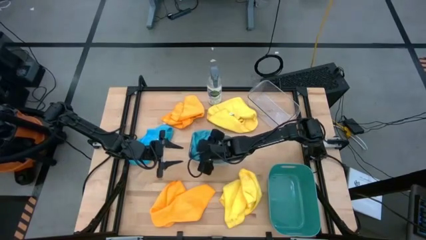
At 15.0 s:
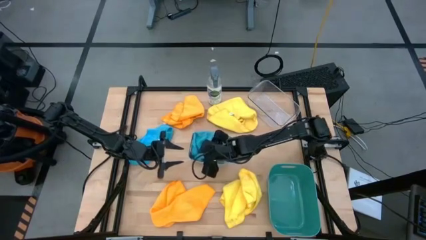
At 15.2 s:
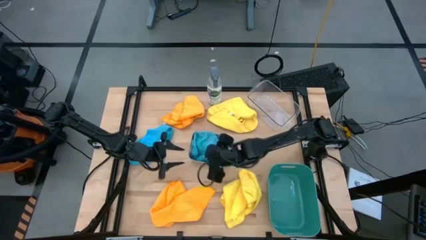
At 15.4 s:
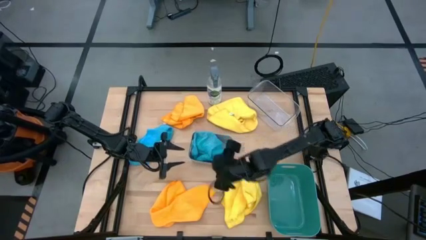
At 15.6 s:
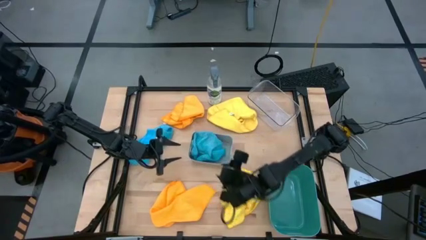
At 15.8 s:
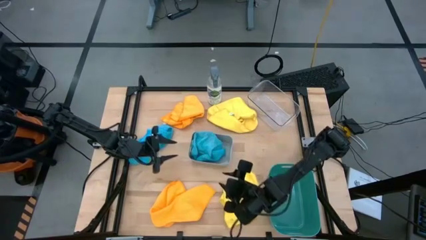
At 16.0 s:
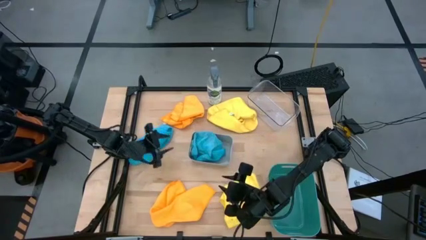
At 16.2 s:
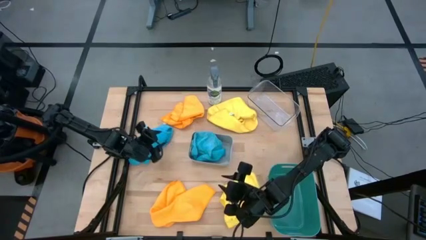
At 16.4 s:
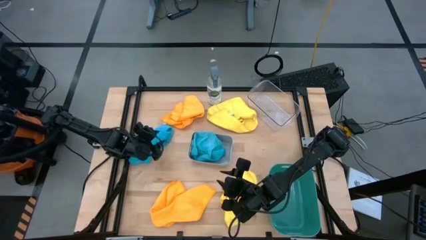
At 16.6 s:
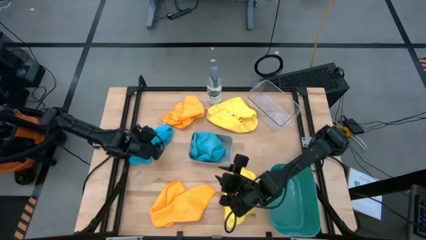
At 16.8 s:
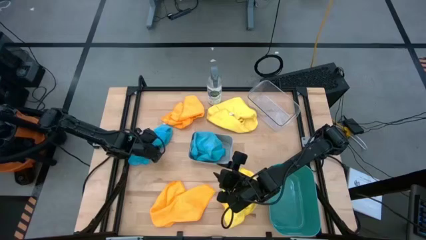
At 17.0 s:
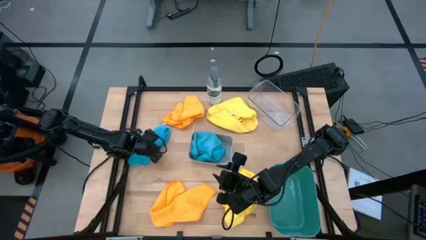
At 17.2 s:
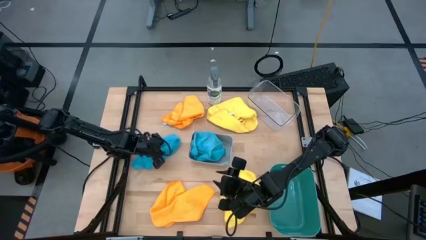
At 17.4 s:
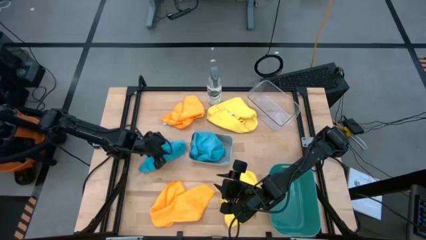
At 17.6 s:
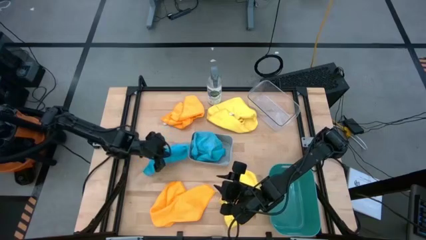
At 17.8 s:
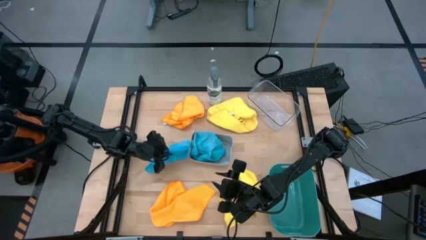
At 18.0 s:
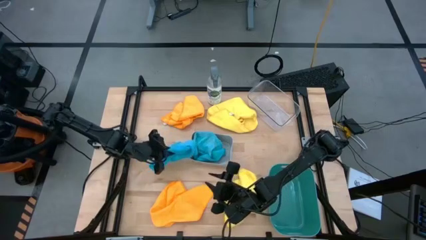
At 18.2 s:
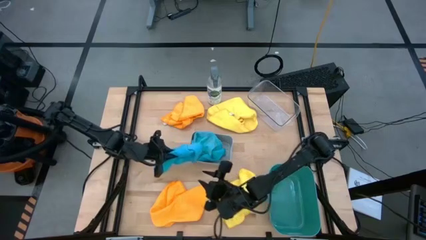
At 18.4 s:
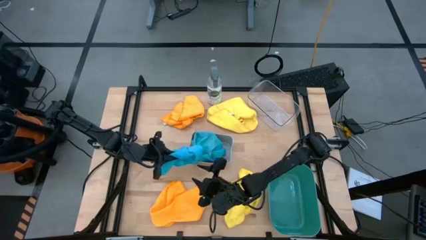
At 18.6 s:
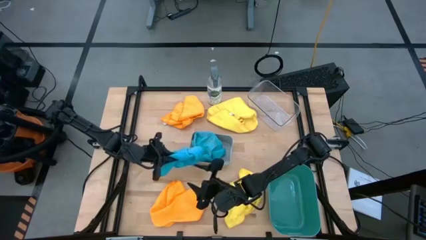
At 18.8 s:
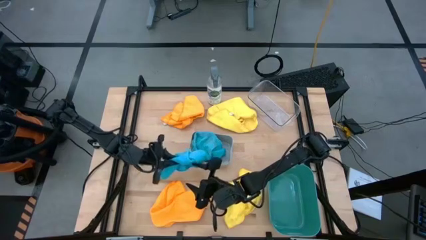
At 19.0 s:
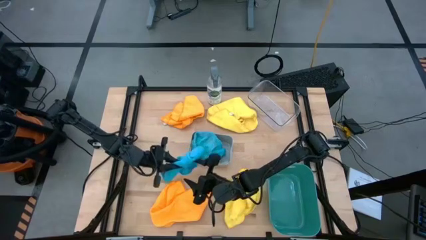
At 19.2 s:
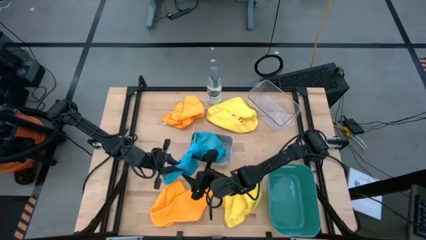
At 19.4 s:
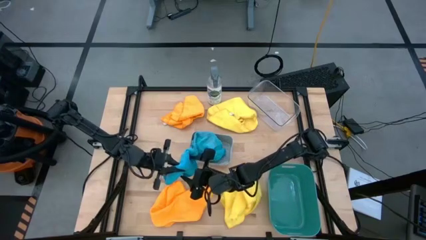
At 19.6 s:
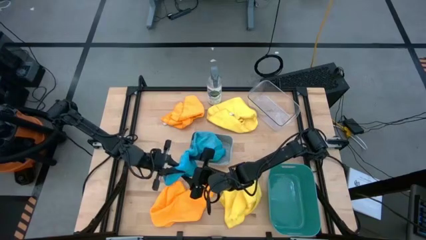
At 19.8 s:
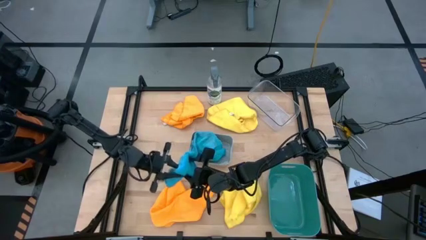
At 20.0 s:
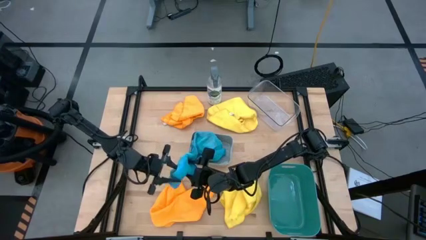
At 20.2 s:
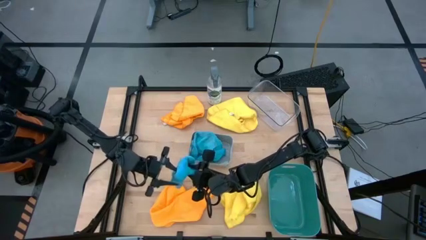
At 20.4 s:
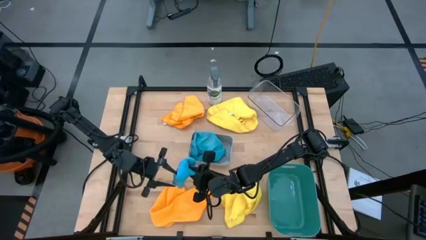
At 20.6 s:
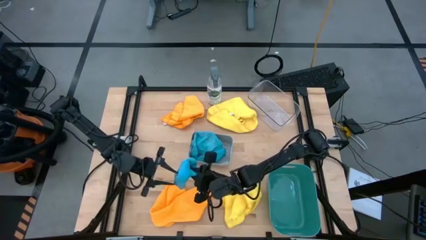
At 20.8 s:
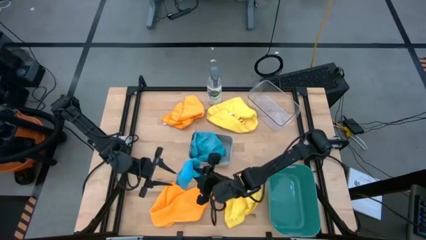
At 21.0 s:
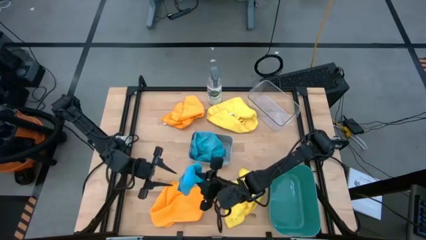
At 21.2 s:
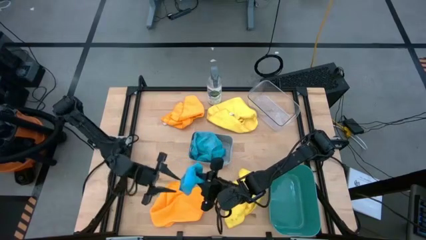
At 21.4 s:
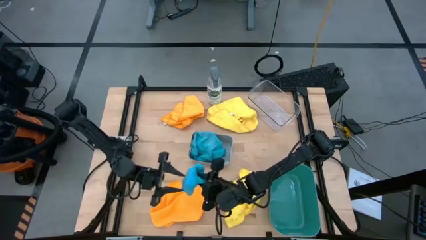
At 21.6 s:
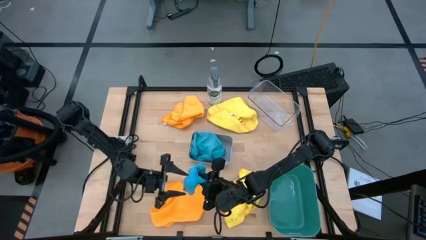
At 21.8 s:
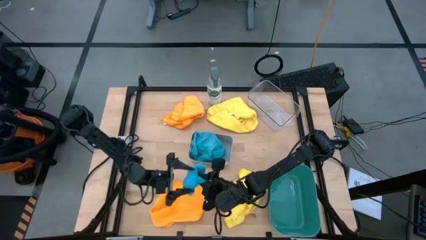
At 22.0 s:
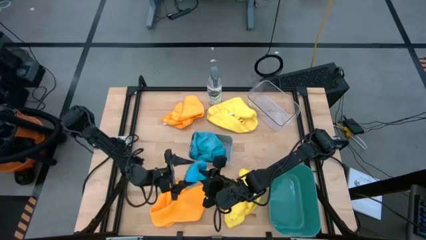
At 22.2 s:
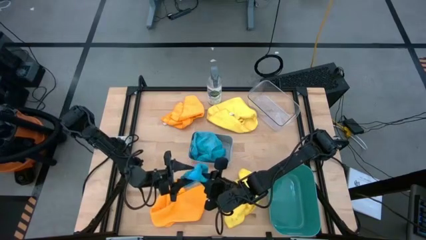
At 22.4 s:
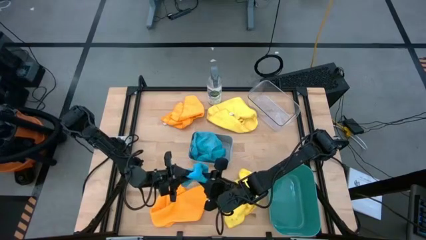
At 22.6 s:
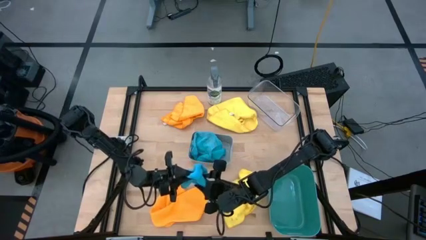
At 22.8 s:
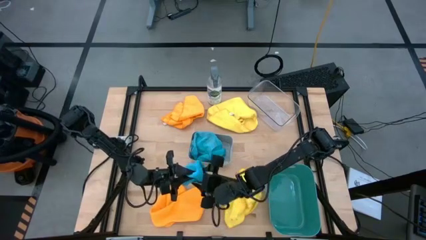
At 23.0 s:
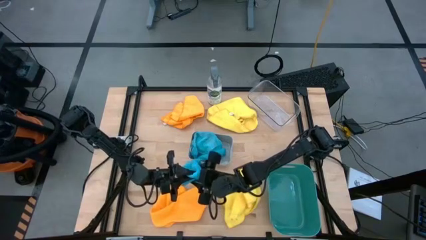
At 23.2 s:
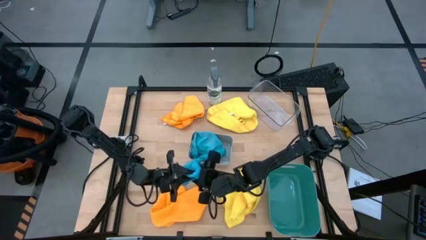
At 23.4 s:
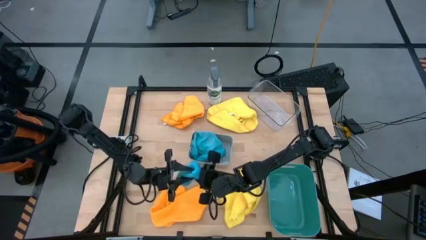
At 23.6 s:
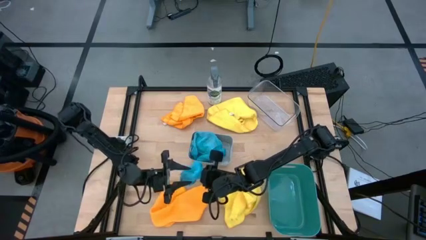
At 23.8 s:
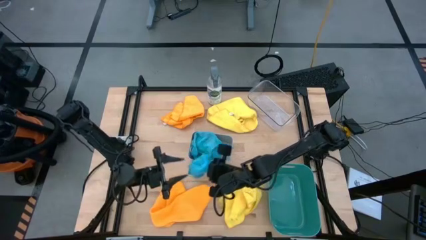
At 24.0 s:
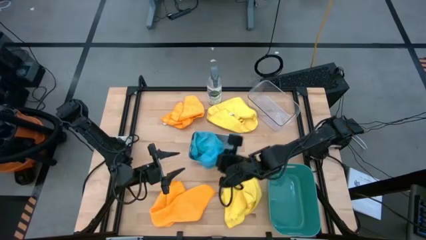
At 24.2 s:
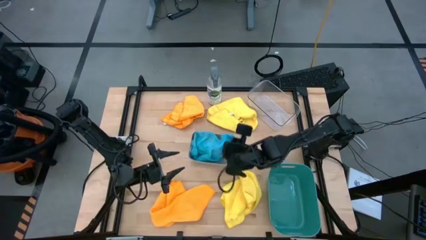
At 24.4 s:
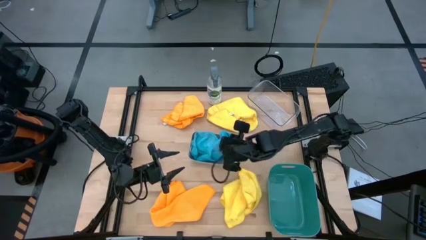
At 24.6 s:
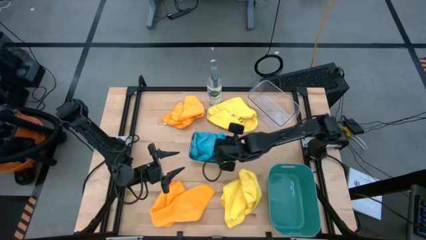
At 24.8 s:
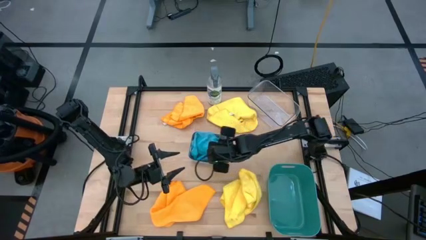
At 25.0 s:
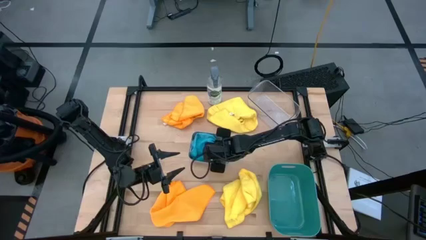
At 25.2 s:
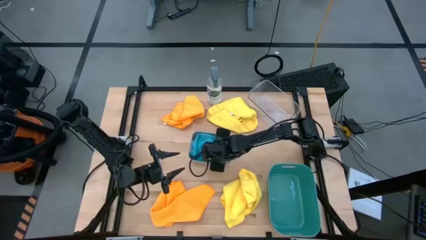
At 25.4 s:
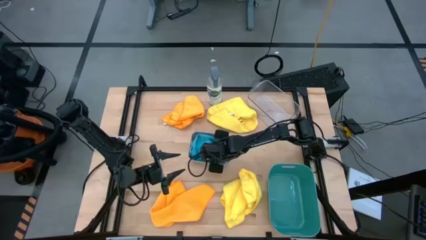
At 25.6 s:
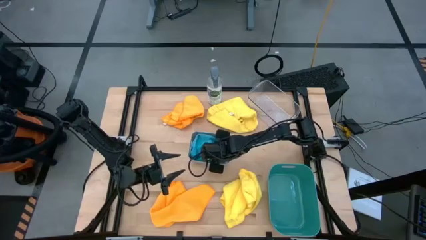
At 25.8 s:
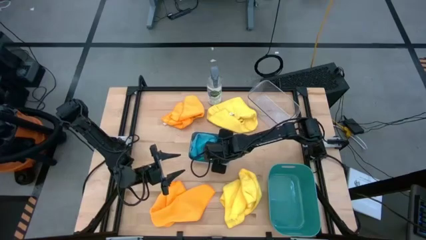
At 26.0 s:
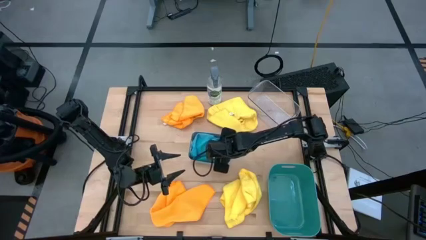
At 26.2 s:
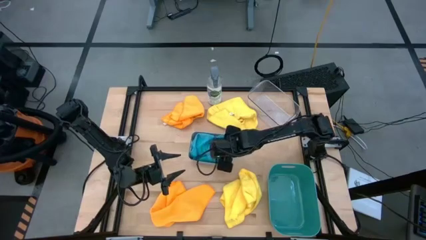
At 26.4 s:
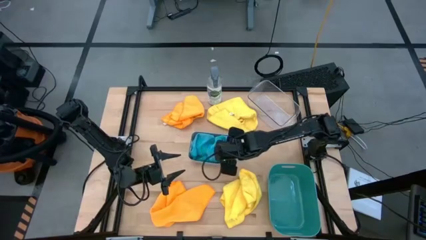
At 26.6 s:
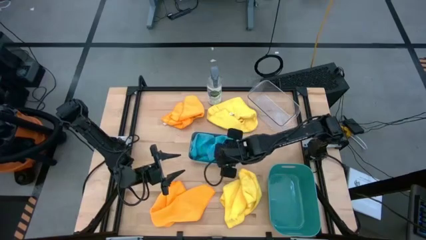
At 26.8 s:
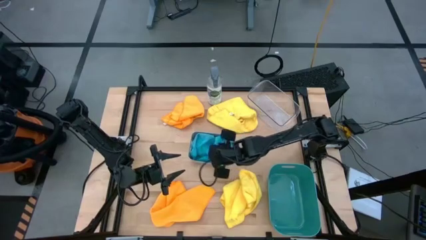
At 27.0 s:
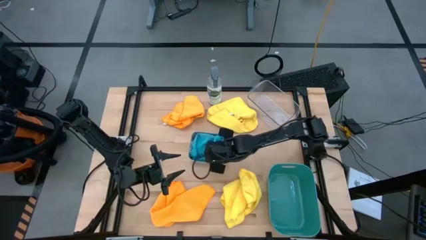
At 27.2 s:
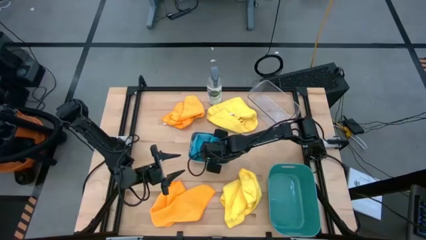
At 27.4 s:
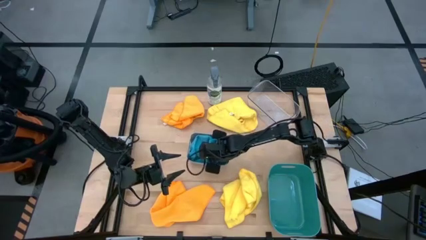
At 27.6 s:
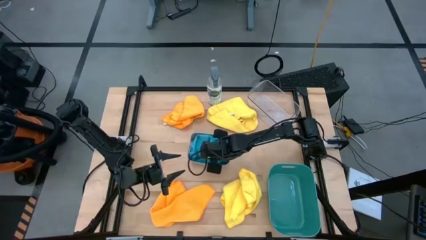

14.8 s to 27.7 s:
Task: Sort microfiber towel by color & place in baskets
Put the blue towel in the white container
